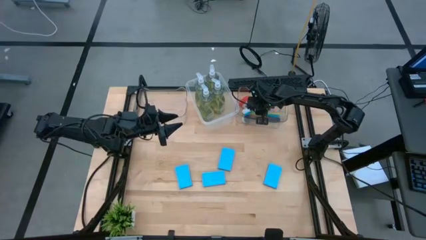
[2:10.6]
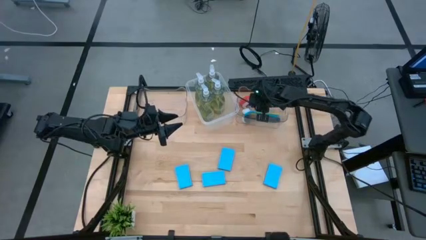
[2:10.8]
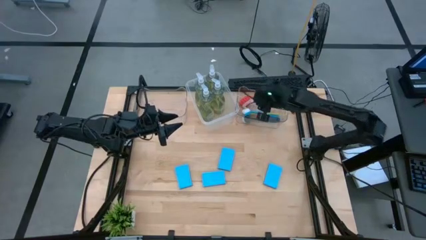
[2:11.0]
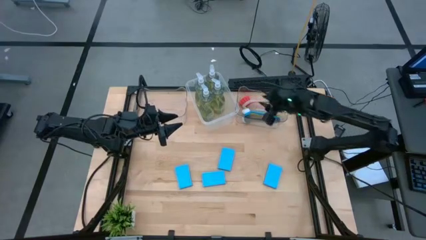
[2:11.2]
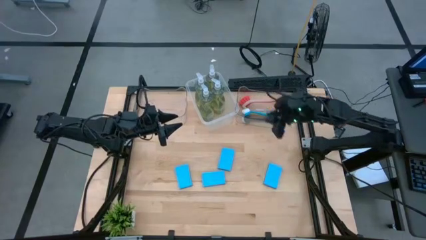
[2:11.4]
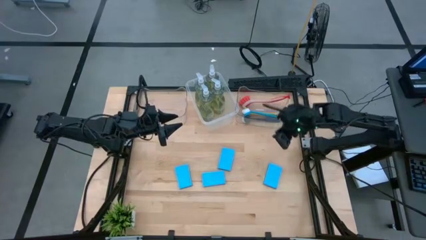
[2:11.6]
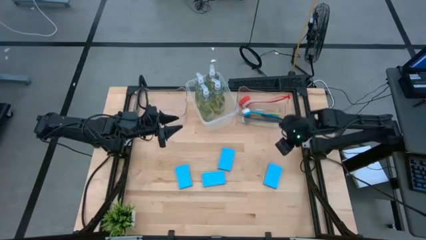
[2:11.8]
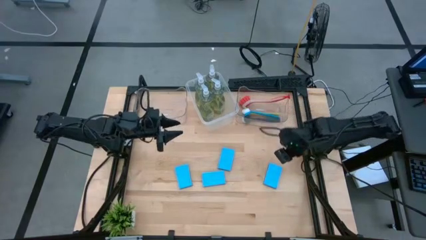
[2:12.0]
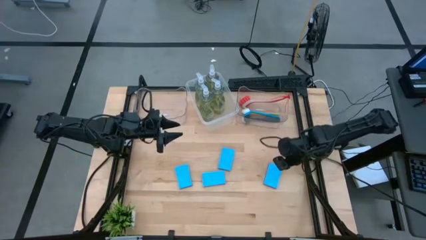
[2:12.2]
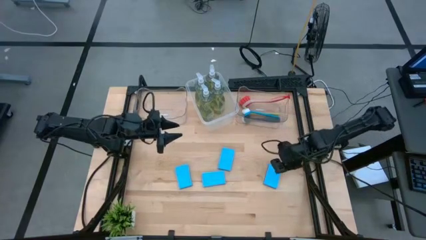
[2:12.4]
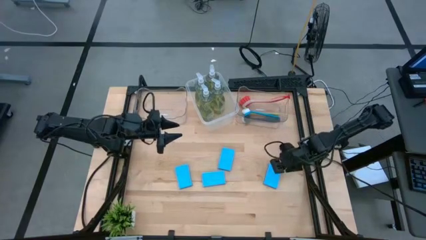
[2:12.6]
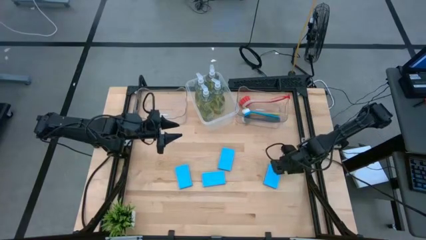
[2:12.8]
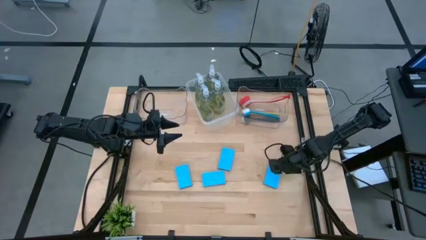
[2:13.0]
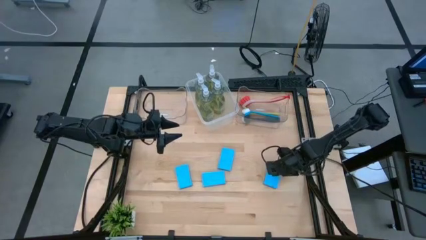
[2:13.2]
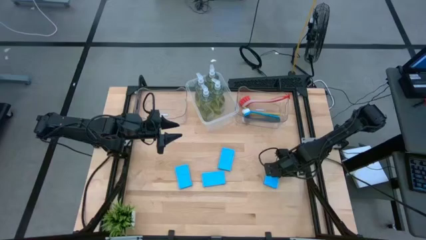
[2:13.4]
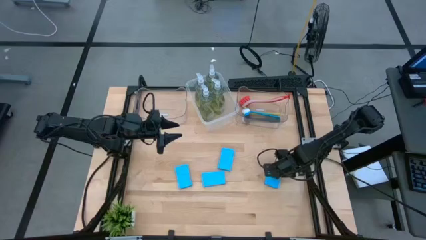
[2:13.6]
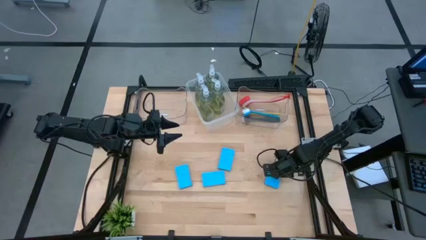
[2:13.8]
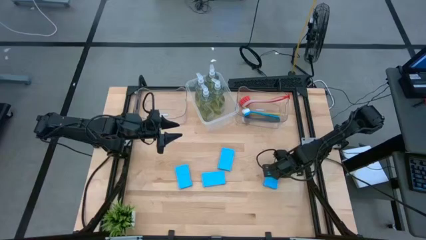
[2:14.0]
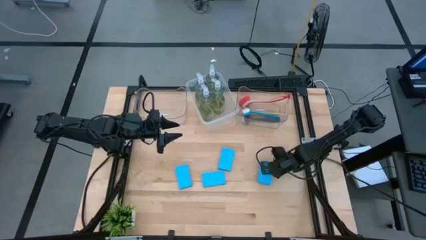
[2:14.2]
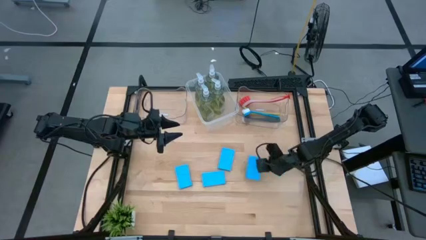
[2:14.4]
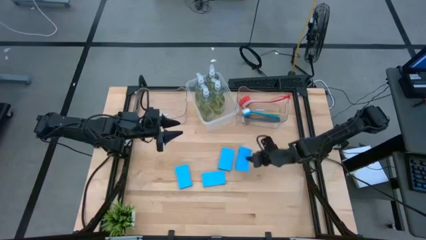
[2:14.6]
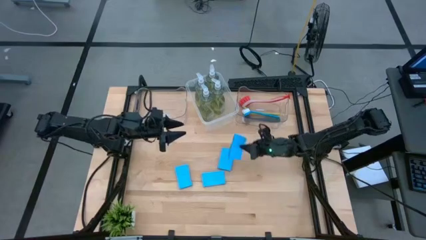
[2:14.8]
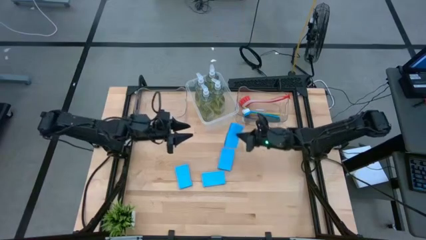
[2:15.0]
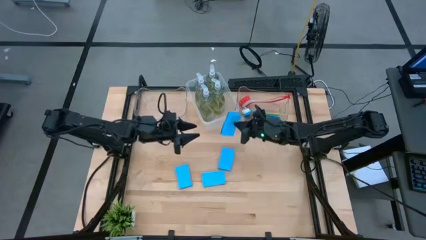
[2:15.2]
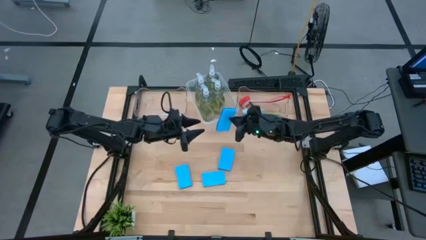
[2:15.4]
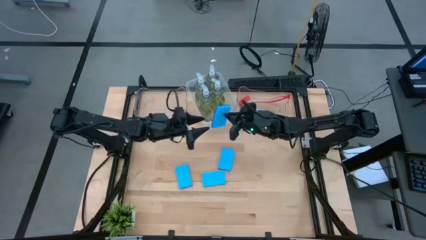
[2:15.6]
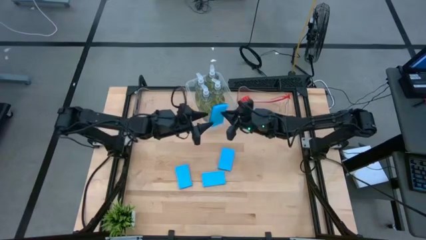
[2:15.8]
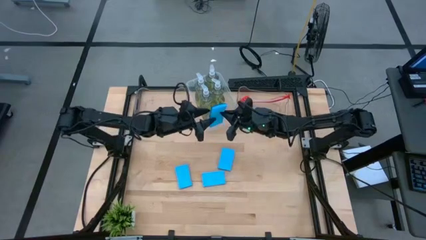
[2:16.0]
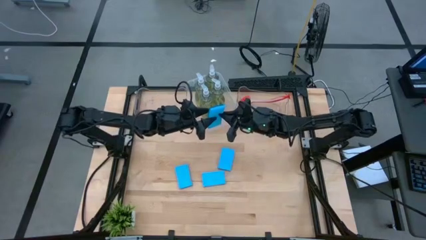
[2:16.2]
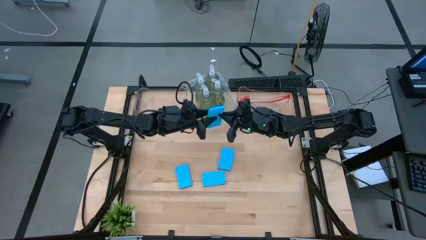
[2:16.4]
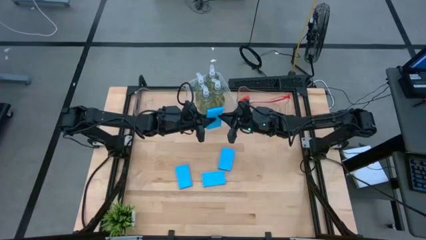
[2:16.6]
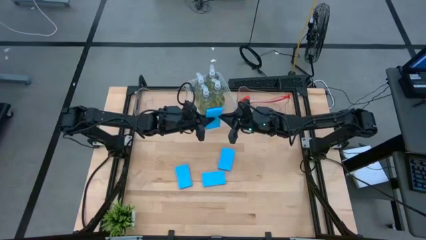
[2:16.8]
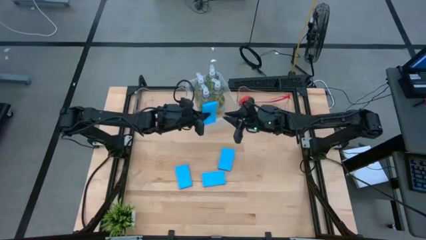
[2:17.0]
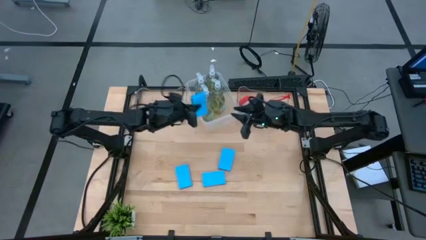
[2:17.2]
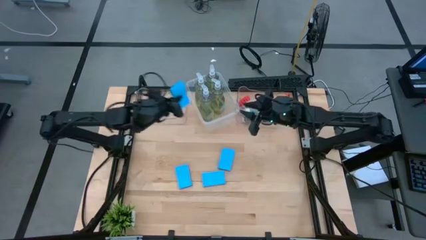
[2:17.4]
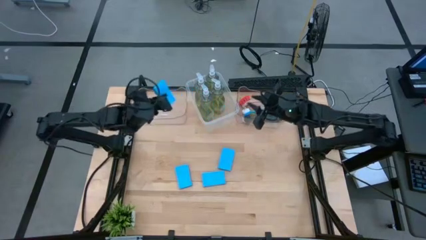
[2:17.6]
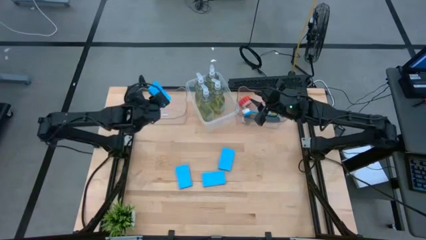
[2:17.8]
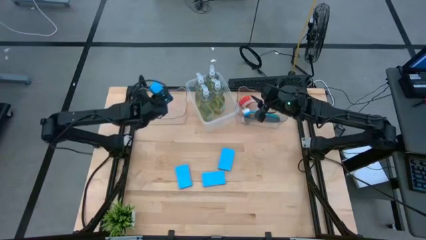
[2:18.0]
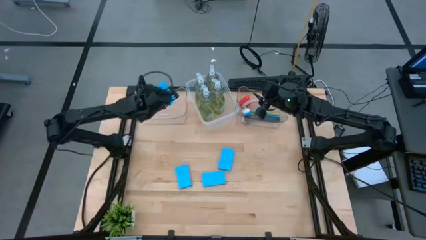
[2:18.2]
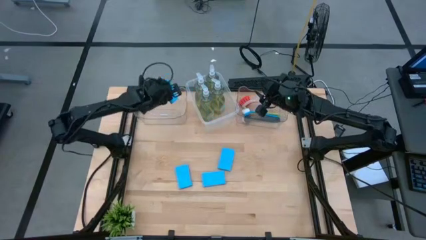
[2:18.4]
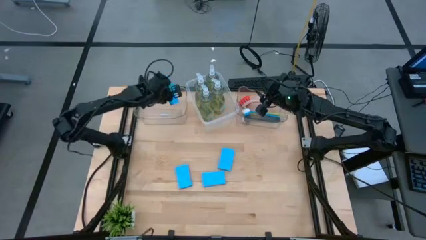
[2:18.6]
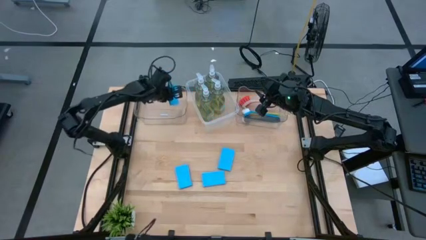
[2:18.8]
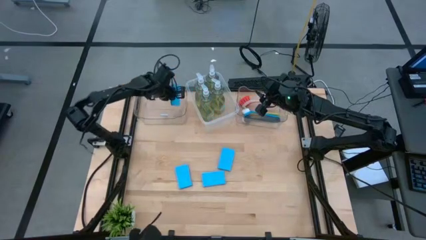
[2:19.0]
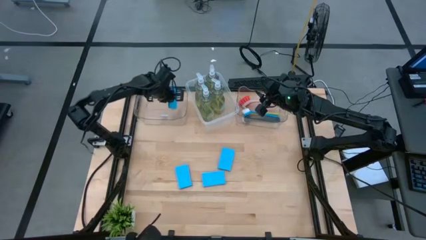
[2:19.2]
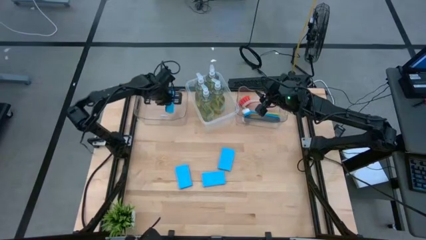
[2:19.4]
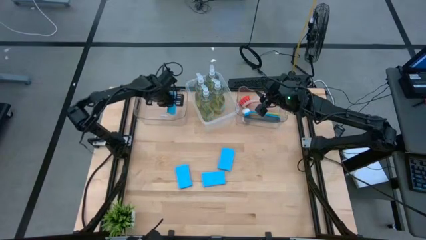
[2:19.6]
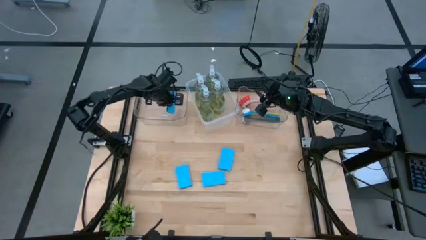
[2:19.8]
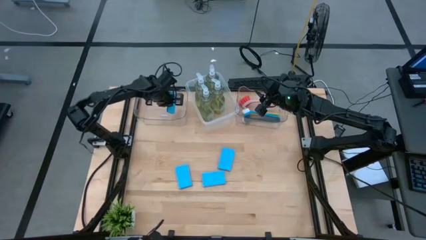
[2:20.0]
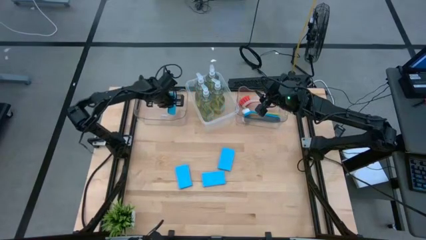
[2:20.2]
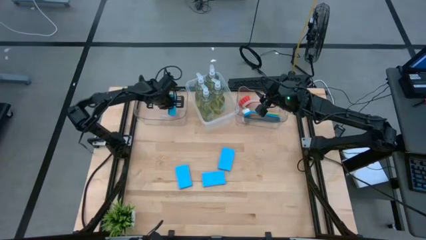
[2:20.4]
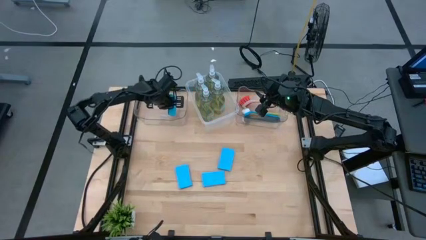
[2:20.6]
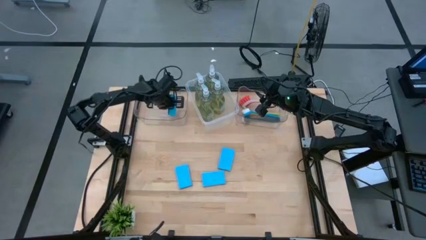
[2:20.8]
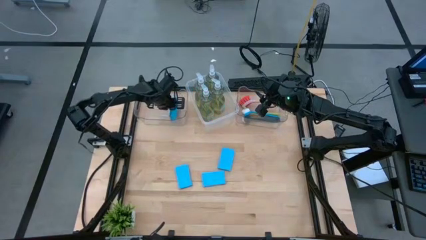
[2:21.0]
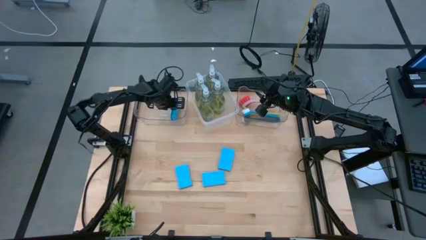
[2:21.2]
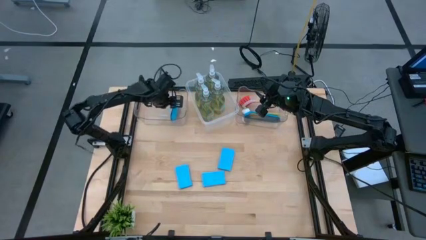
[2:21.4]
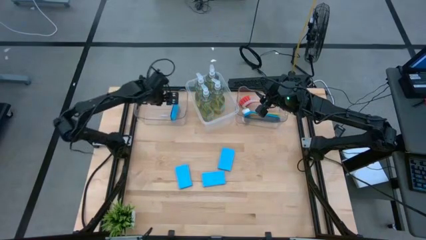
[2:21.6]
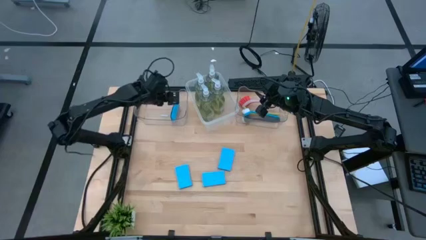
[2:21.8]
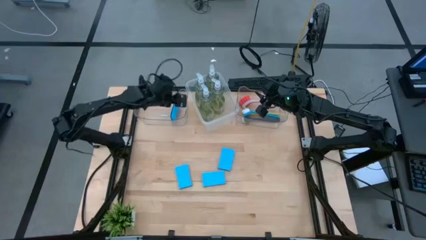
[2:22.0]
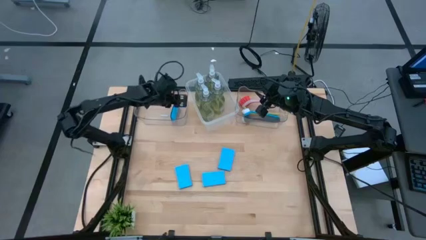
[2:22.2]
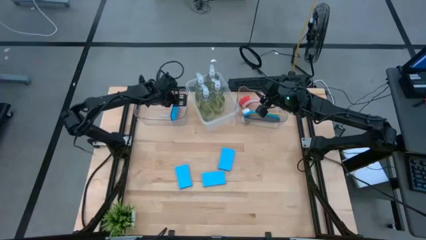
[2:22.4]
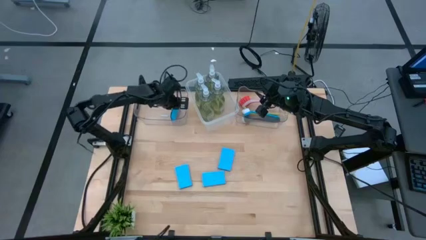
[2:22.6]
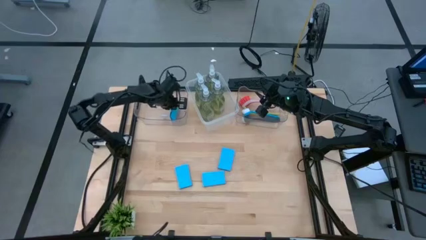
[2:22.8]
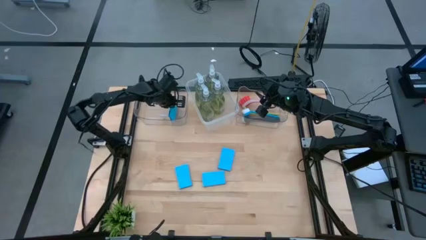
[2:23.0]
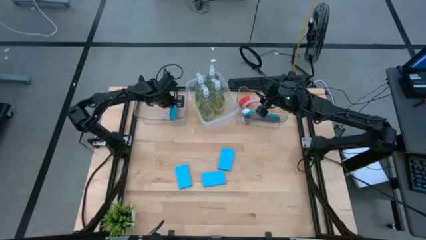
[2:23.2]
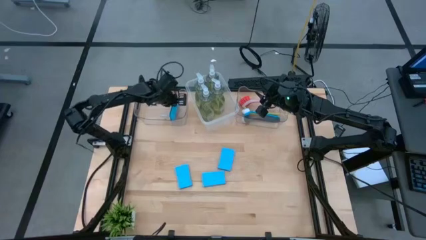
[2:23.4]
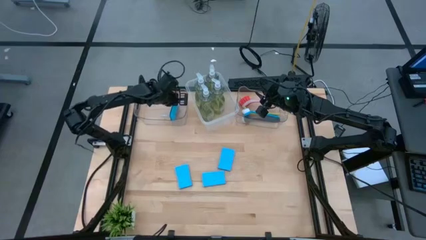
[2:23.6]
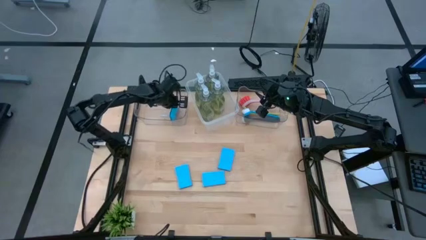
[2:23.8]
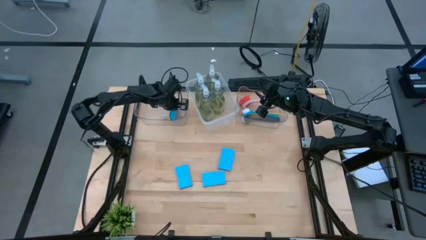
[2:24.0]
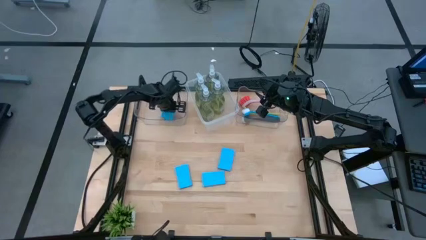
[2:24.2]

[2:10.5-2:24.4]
Task: Pick & Place Kitchen Sink Supplies
Put the sponge into the left transparent bin
